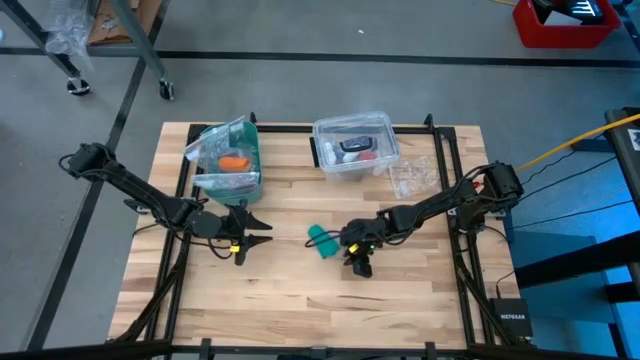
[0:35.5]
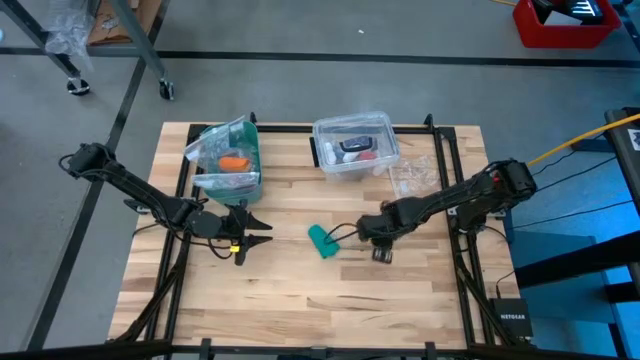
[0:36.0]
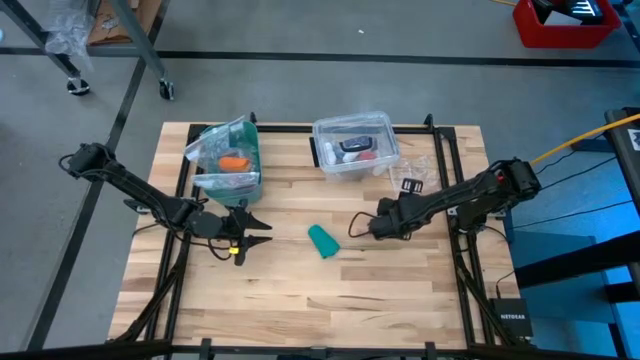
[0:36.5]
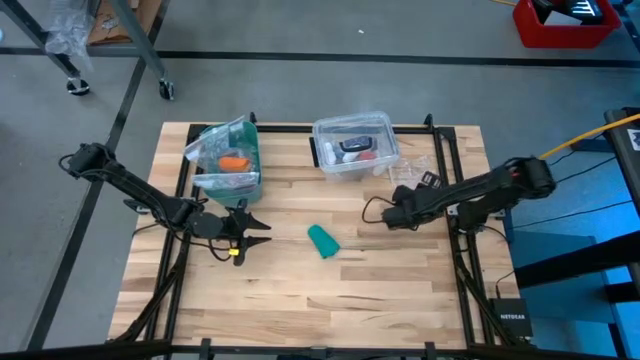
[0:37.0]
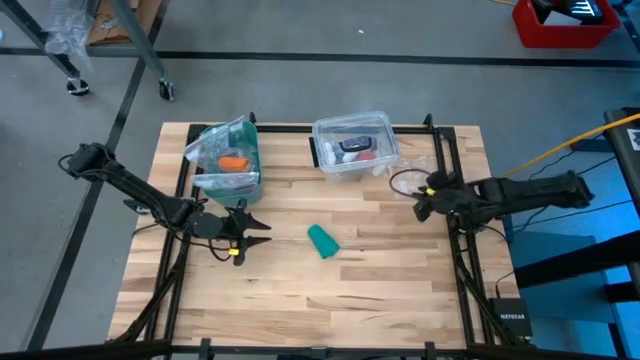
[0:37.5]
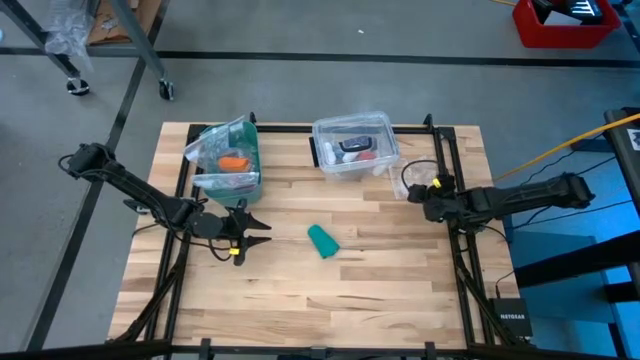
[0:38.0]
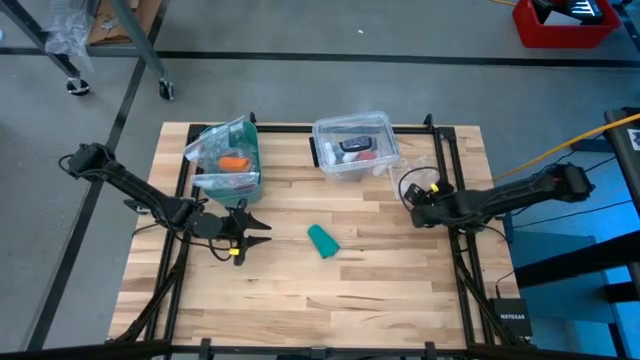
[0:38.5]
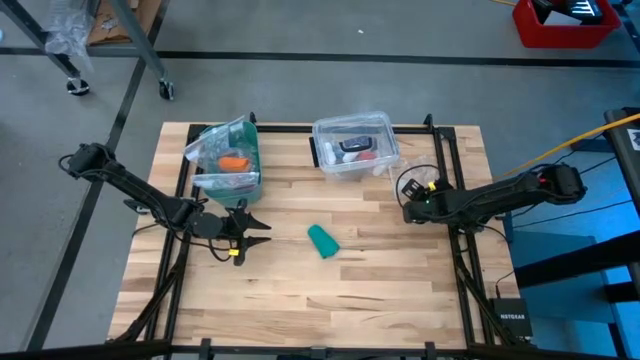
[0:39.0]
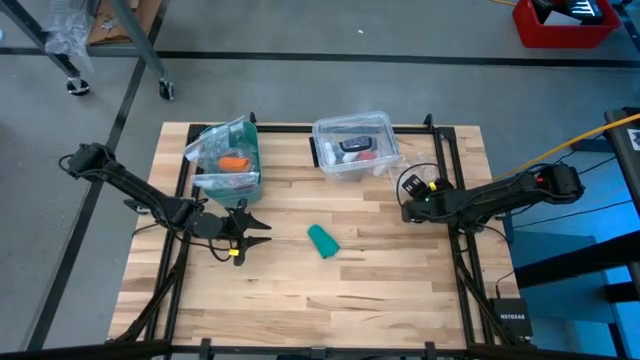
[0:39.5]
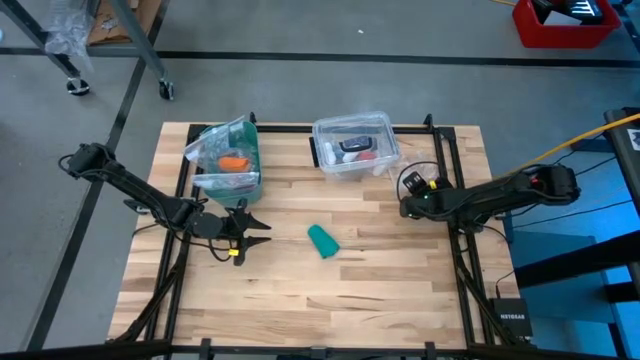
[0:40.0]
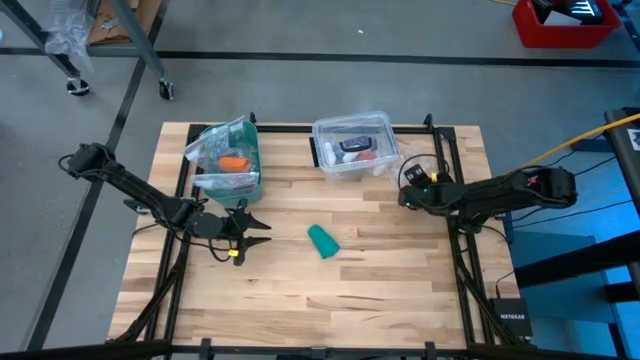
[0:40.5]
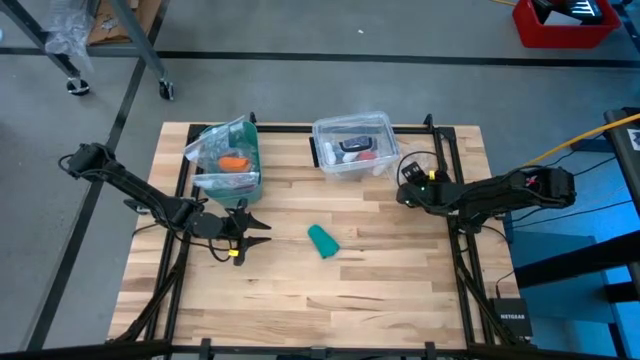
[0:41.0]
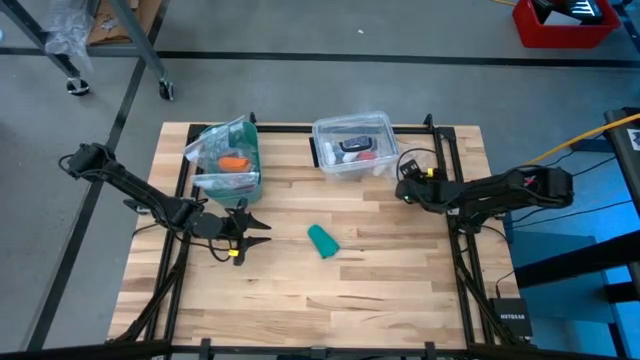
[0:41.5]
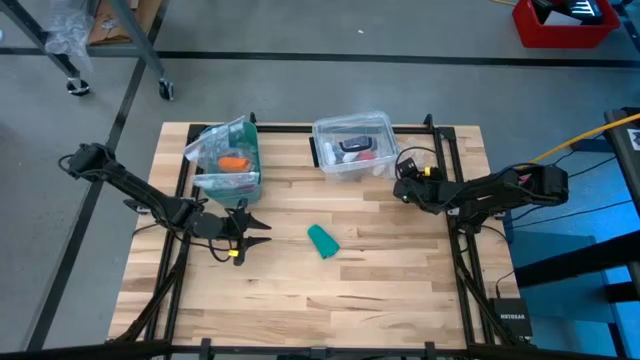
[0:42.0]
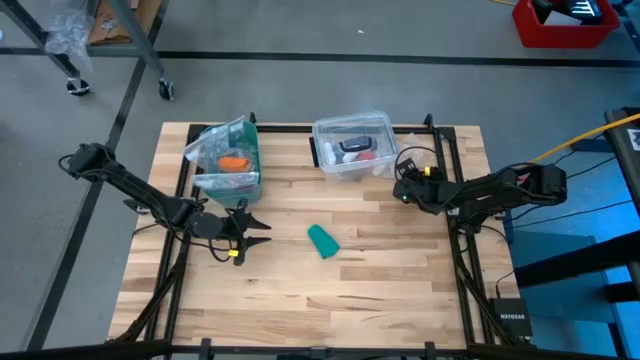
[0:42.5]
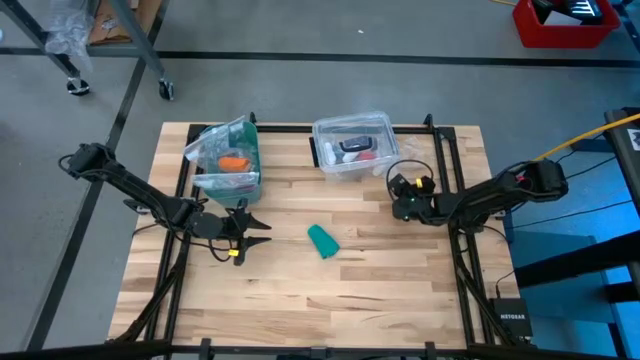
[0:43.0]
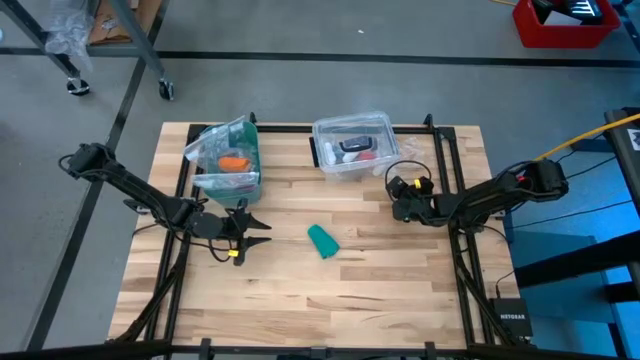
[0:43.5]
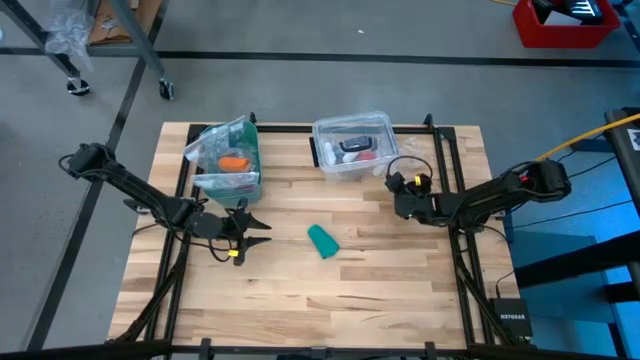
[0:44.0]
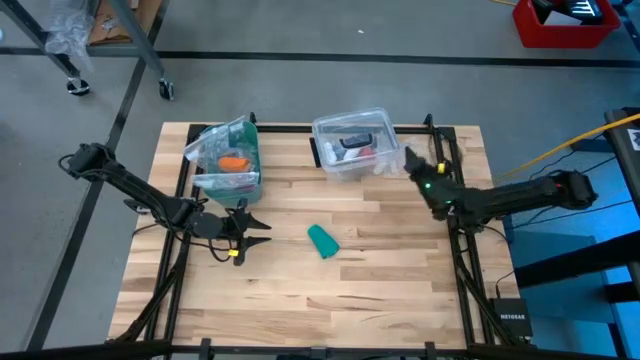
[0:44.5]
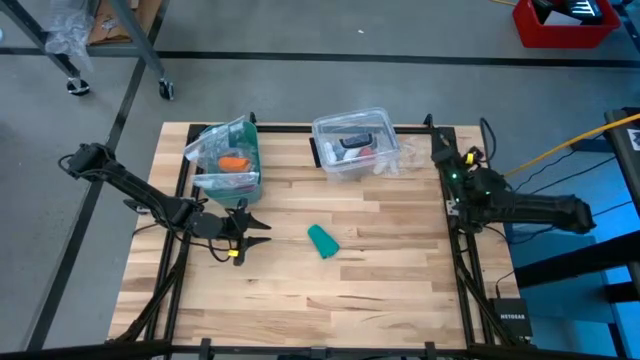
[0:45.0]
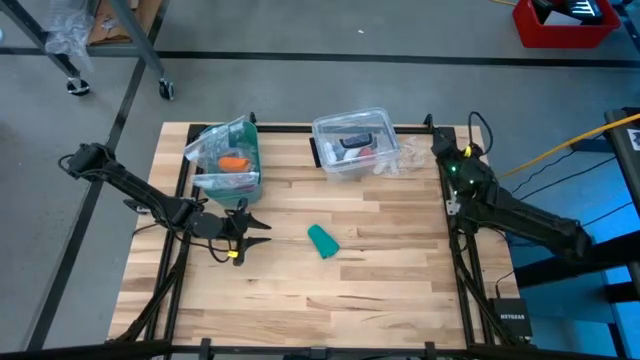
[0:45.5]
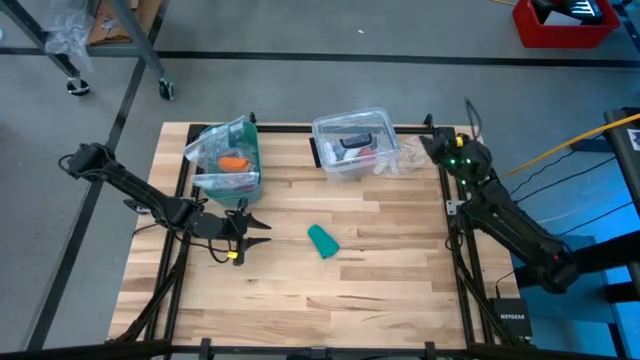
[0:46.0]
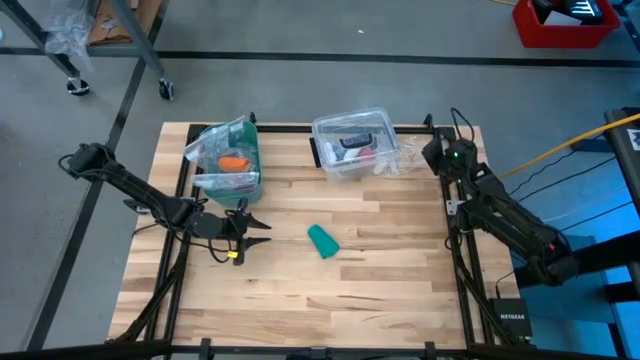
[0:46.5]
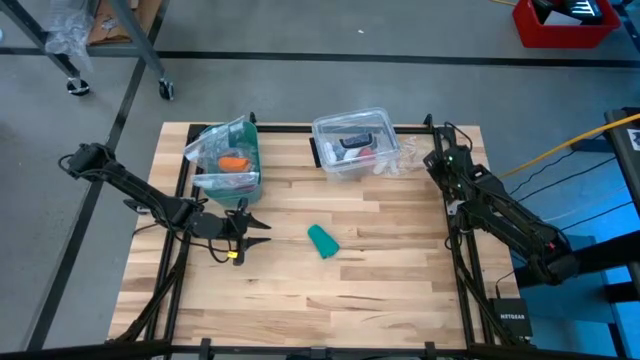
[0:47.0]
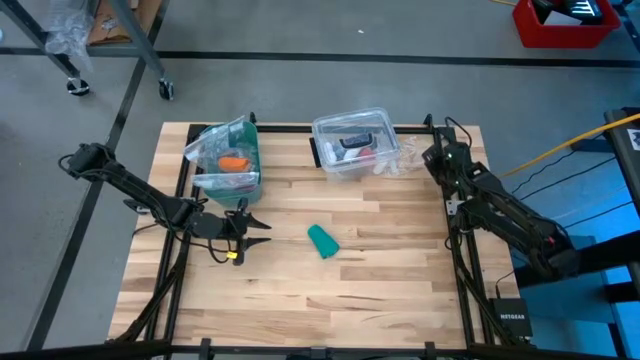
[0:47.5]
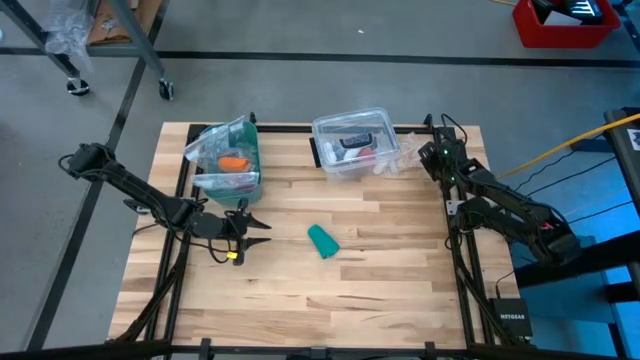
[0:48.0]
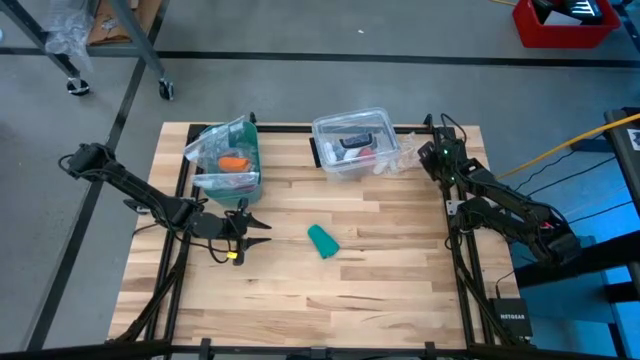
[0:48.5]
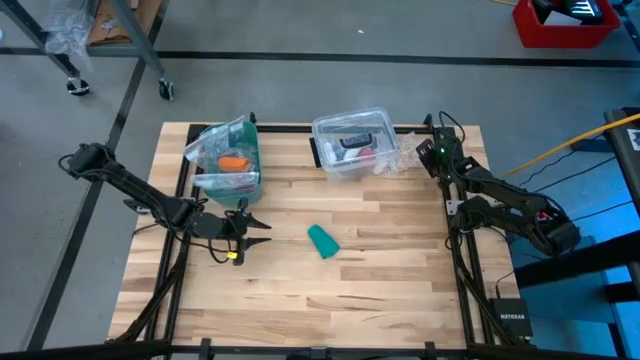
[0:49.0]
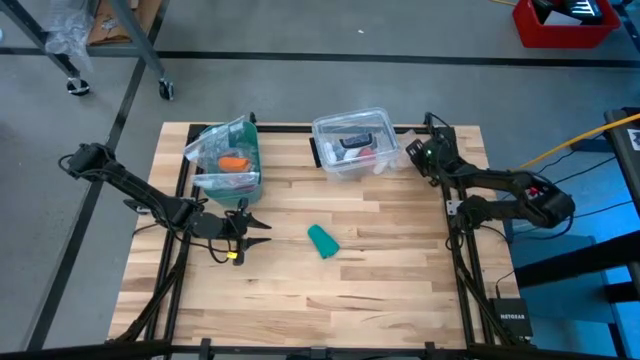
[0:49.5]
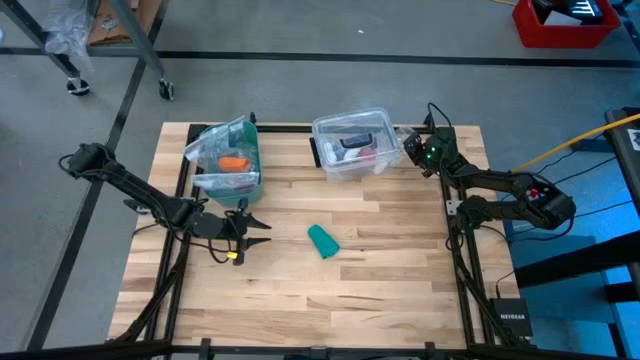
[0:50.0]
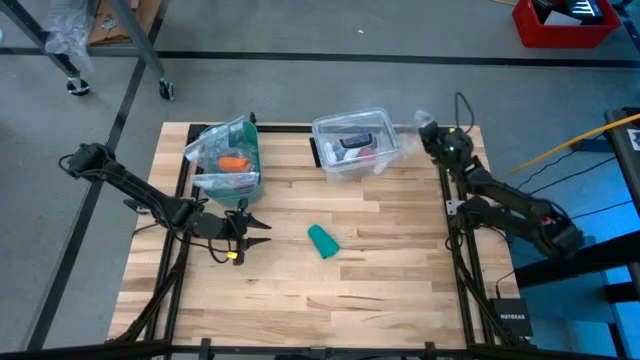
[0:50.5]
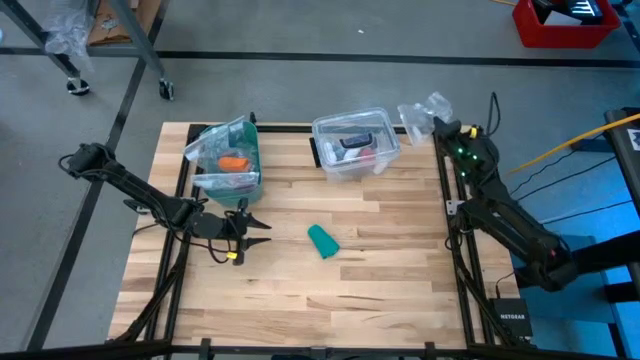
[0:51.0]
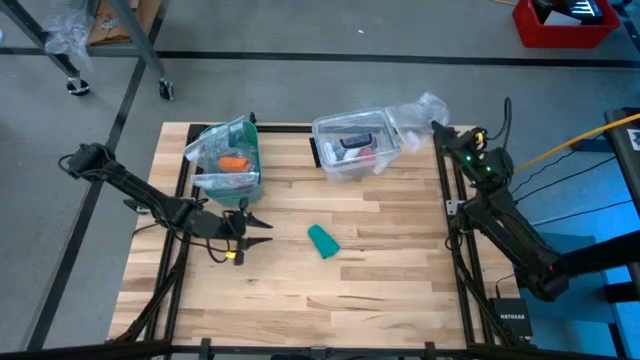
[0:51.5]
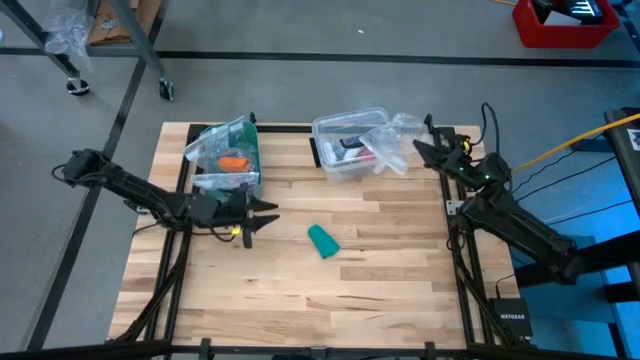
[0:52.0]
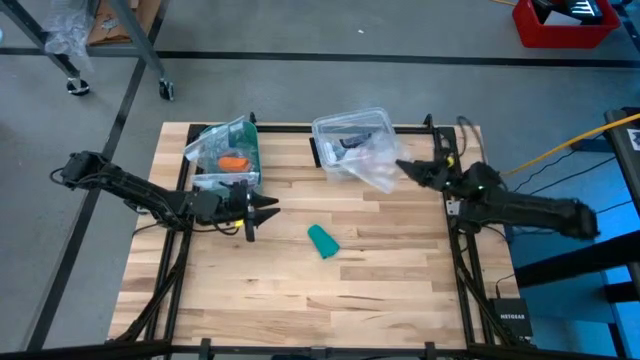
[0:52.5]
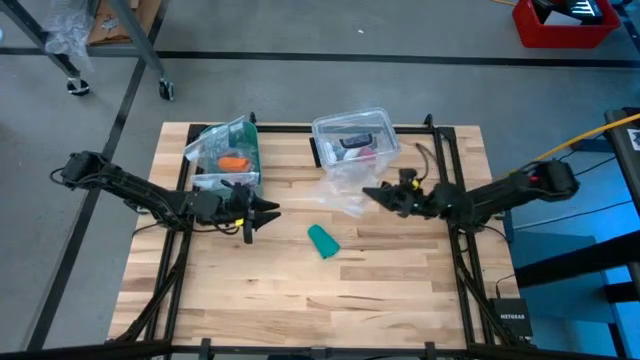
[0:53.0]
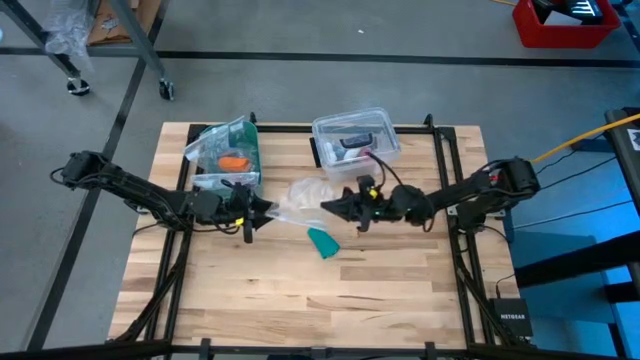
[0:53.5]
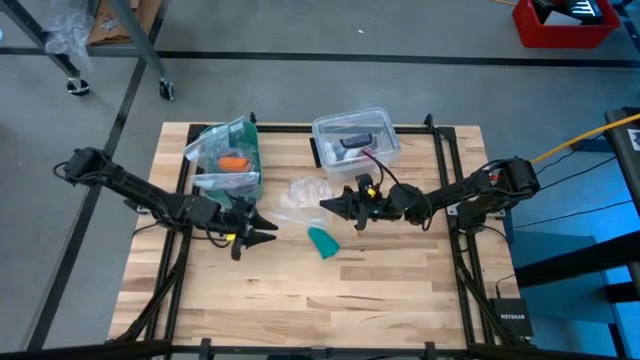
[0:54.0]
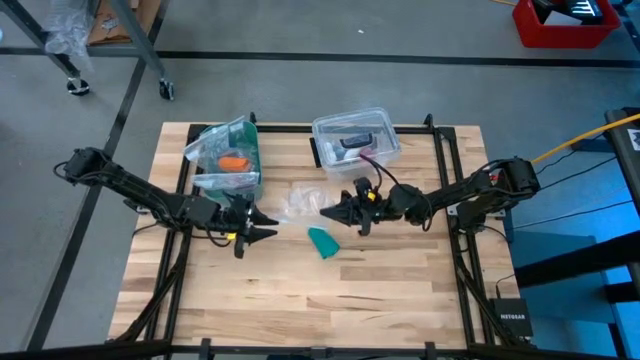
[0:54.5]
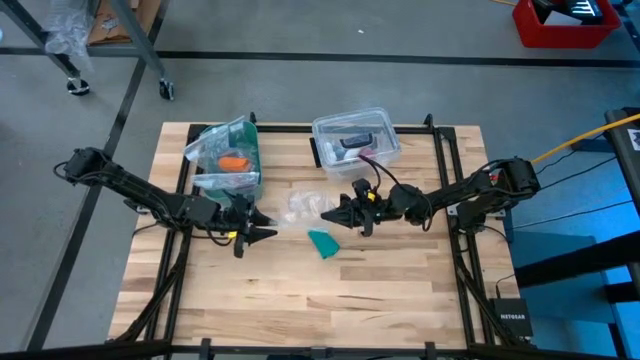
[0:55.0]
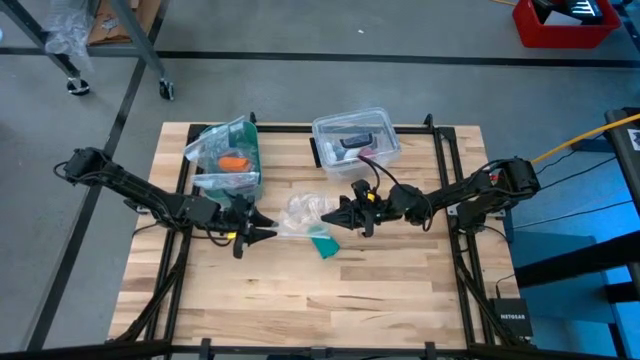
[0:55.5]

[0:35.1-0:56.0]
Task: Roll bandage
Open the transparent zip bag
